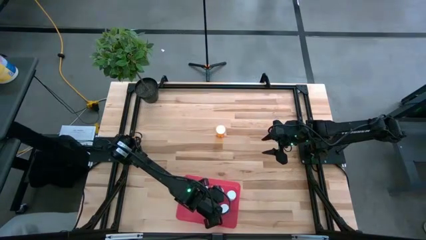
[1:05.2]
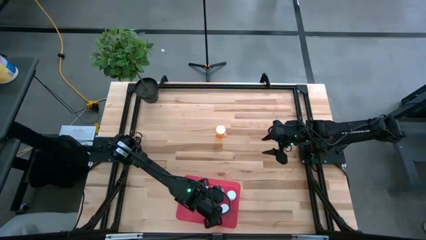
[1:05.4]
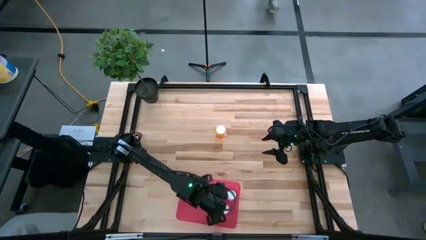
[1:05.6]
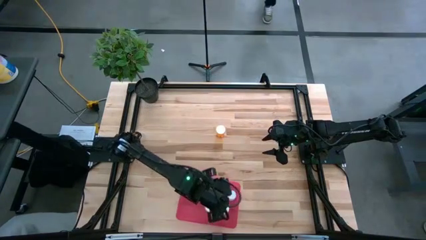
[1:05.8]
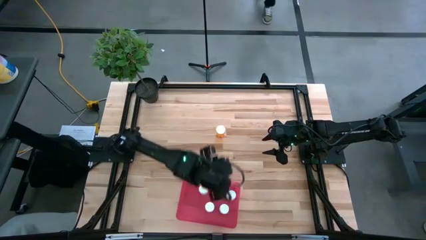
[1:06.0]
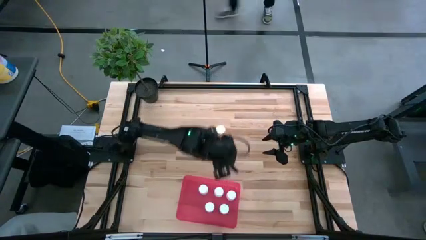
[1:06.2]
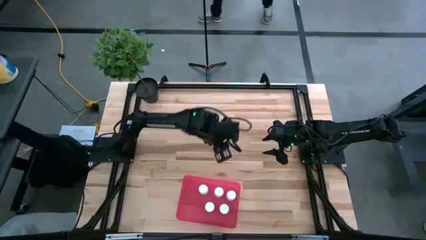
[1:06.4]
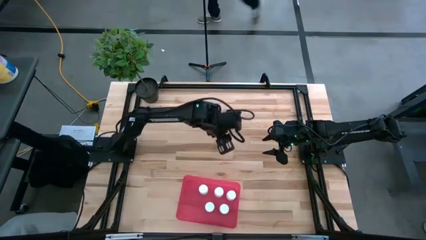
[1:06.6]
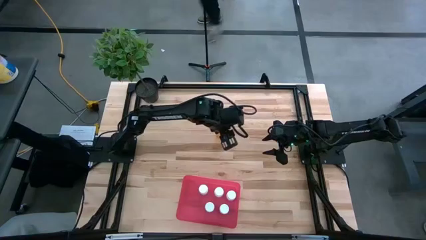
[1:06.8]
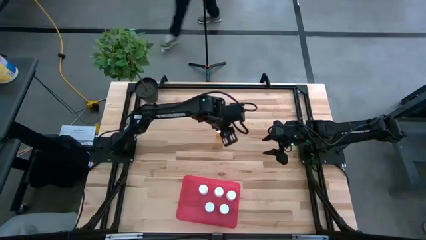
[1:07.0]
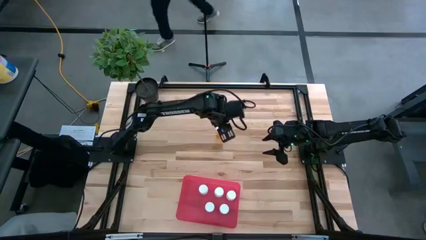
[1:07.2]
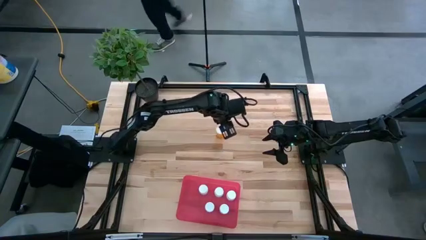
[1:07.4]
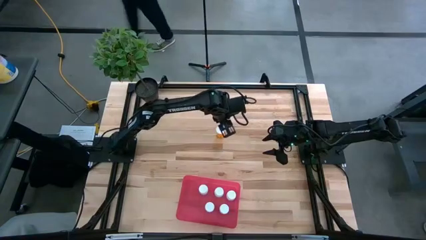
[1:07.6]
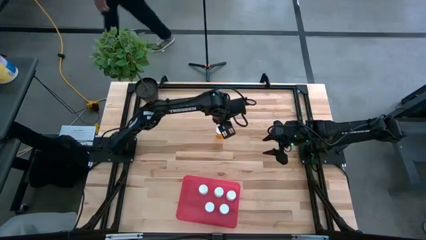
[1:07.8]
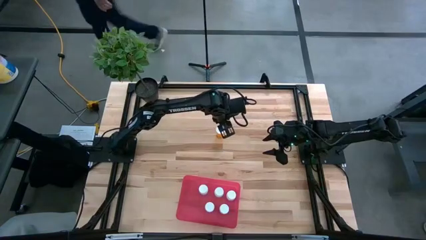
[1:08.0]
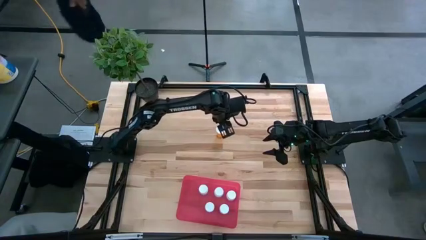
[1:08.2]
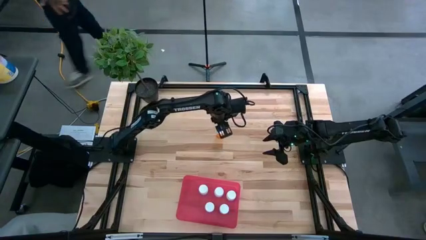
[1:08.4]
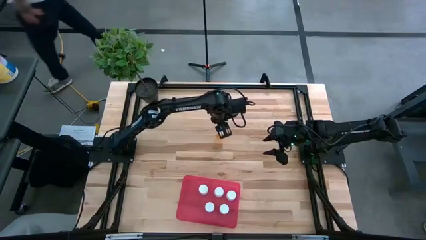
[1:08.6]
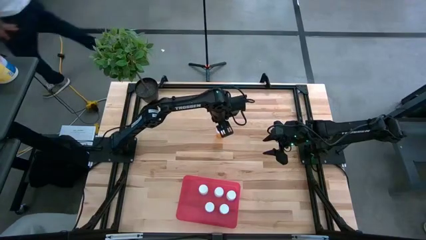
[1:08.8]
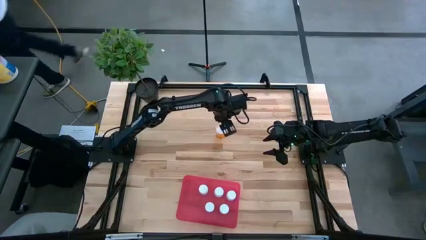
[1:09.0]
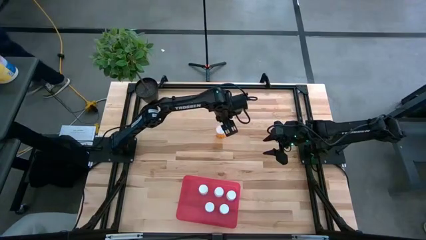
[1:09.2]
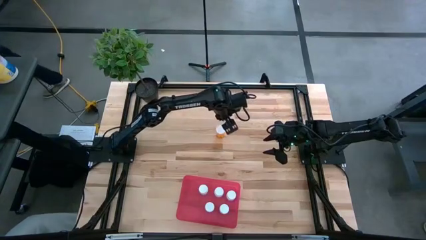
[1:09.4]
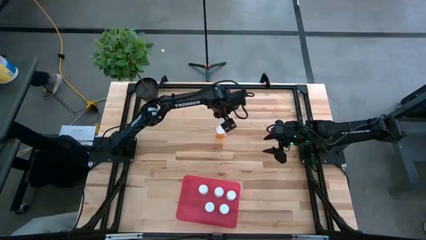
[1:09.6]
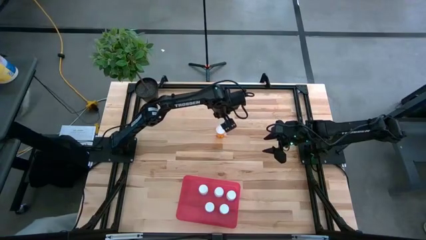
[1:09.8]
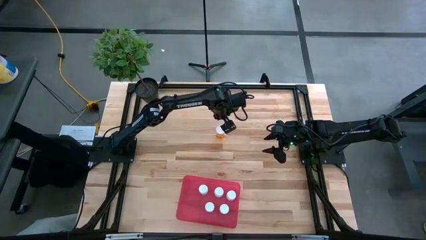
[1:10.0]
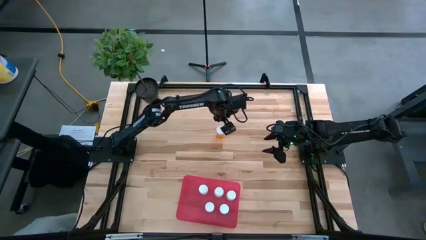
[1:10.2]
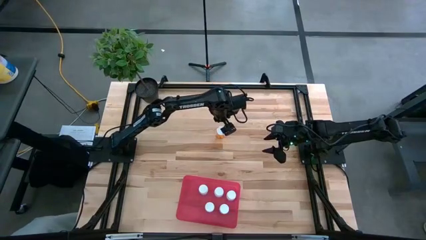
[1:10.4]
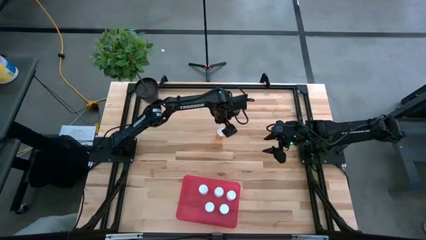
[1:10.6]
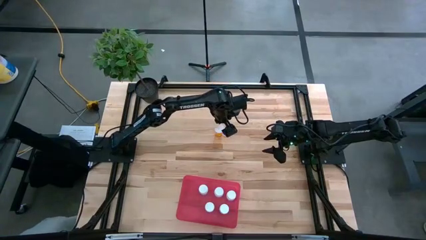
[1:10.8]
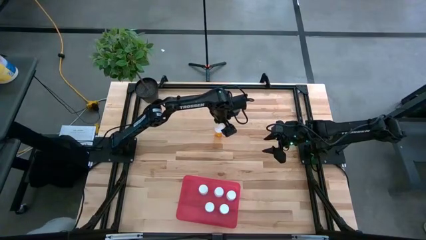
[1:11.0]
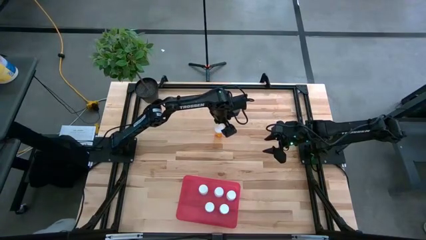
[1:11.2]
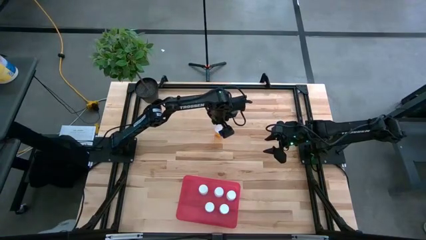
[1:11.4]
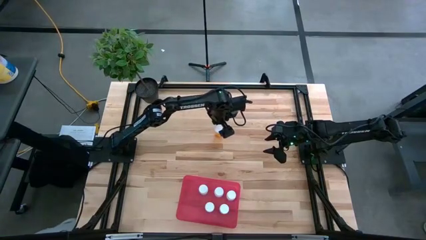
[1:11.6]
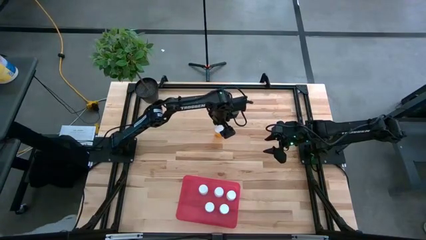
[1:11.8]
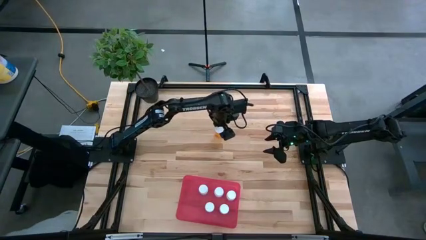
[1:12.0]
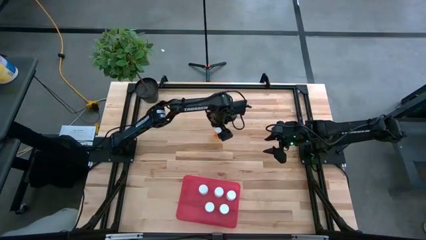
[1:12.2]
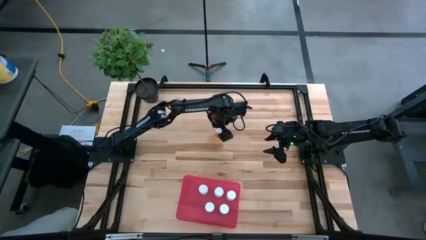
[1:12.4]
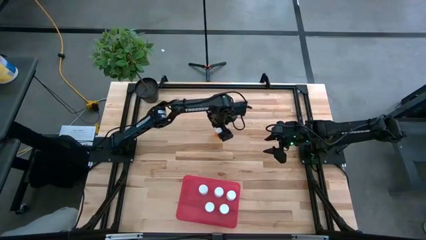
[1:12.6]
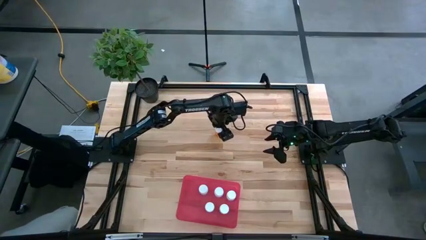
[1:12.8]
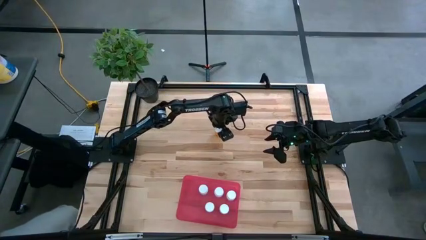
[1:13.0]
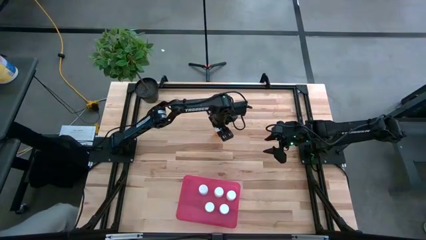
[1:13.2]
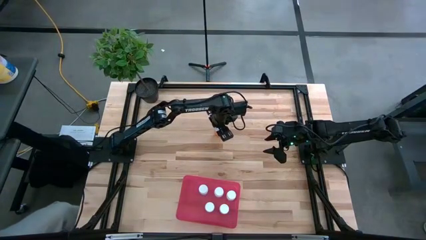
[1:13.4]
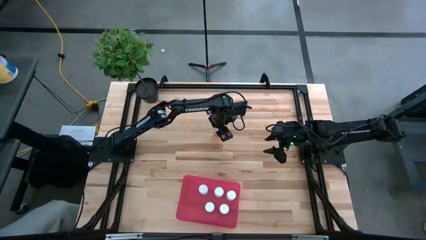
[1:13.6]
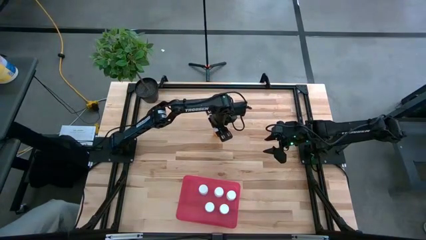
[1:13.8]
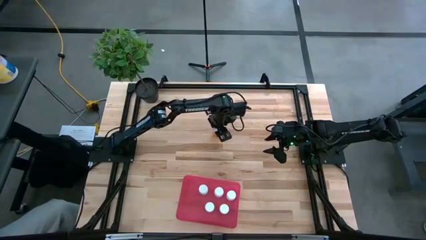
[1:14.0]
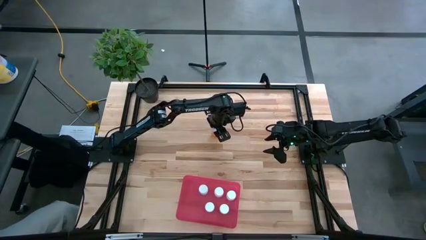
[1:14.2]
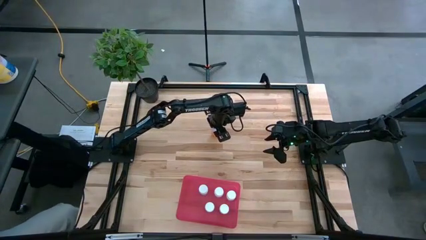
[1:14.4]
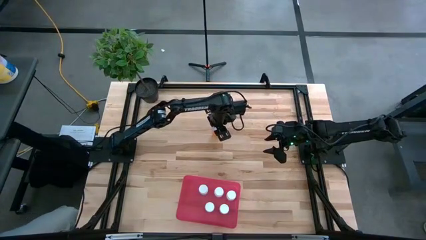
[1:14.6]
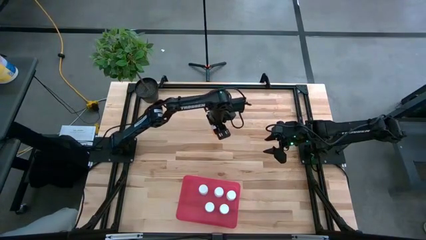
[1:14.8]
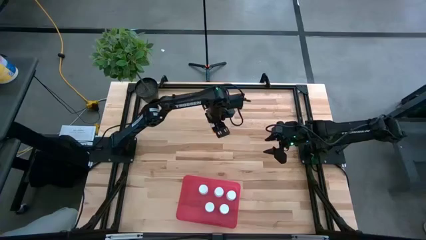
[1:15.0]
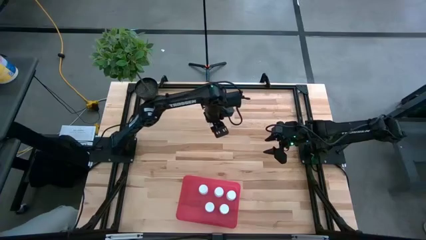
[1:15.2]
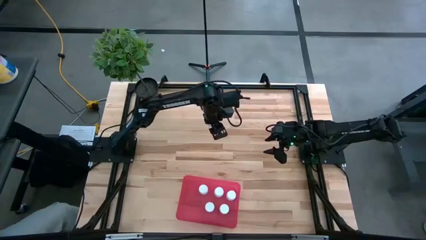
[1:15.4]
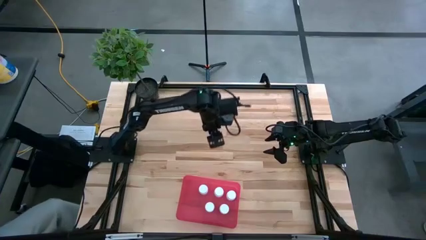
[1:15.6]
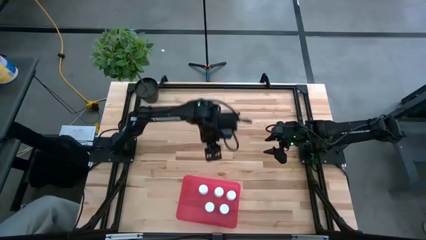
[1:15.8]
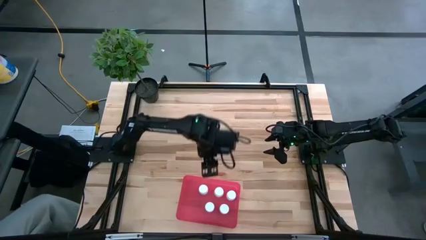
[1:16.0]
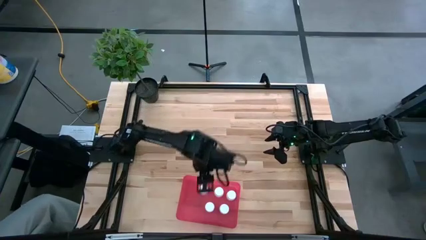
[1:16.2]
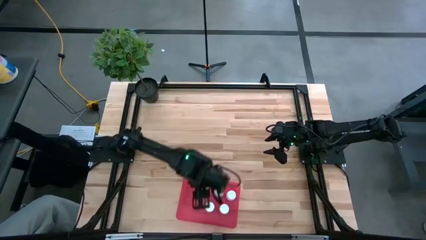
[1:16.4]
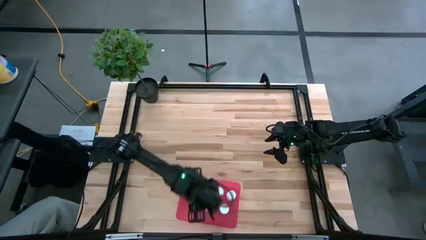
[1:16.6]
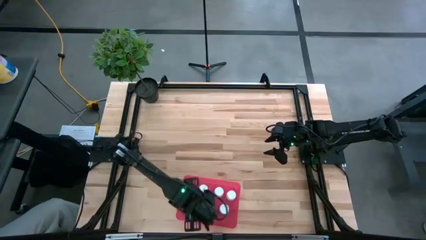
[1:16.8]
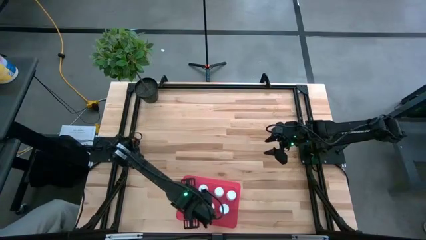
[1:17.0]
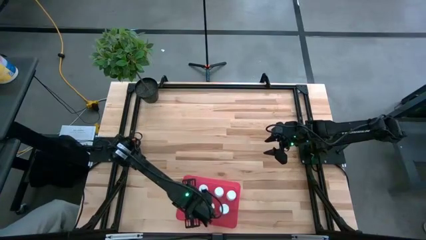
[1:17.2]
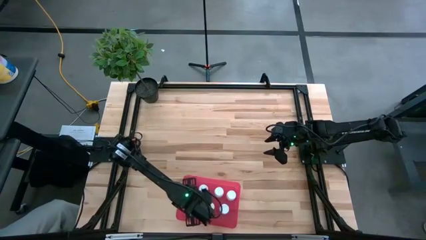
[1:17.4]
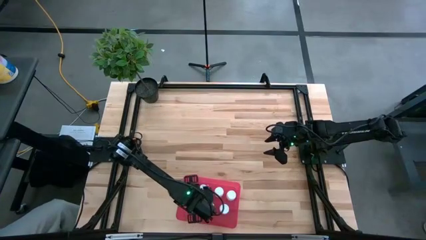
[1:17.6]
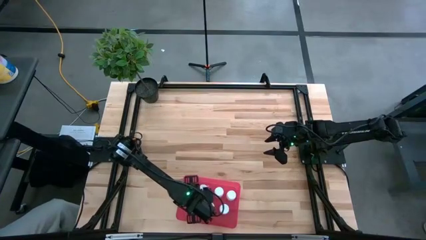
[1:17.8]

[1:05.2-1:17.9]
Task: Pick and place pill bottles into a basket
Put the orange pill bottle into the red bin

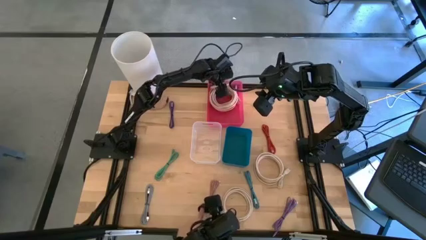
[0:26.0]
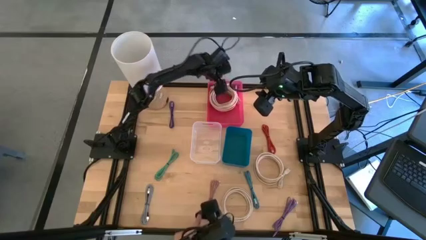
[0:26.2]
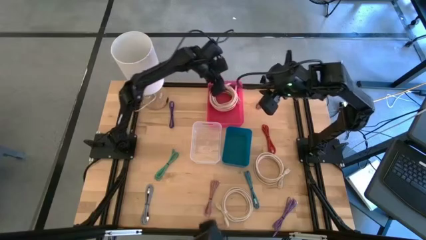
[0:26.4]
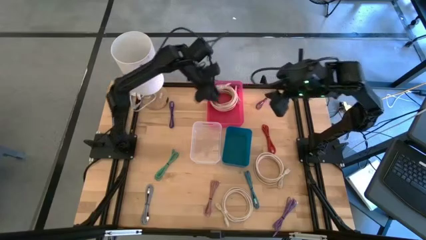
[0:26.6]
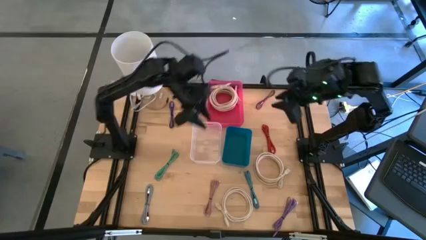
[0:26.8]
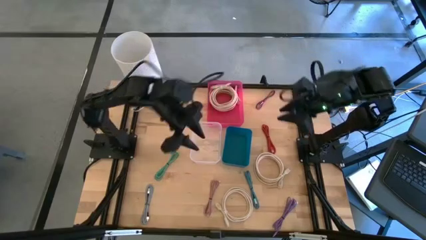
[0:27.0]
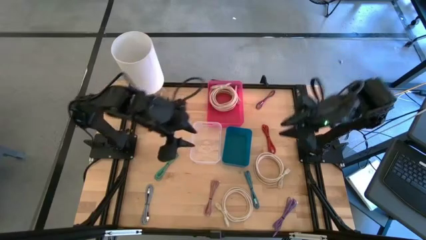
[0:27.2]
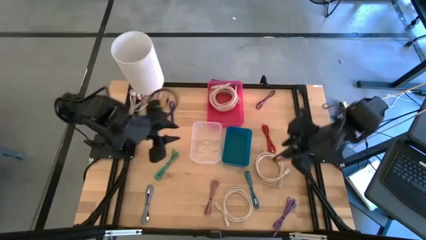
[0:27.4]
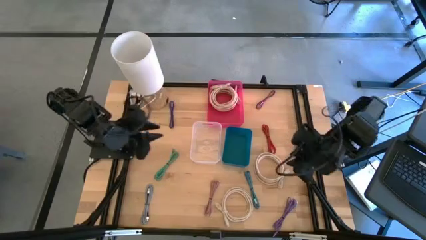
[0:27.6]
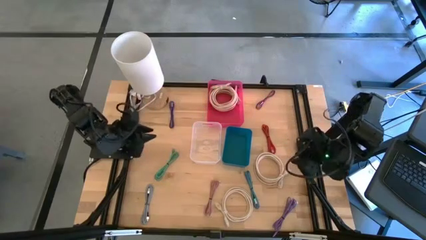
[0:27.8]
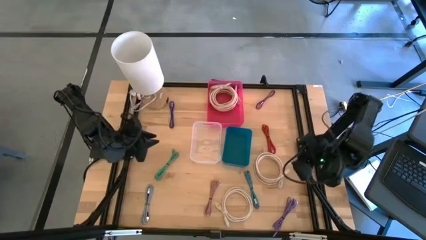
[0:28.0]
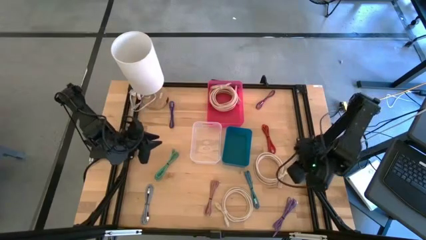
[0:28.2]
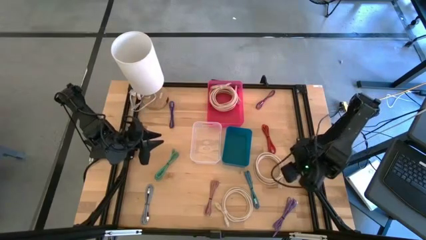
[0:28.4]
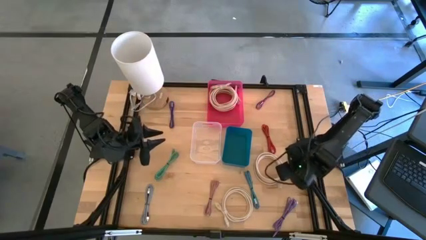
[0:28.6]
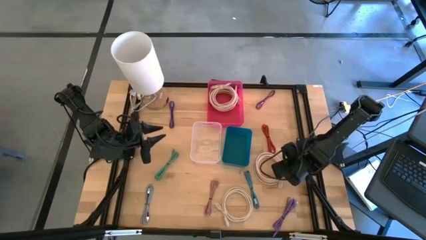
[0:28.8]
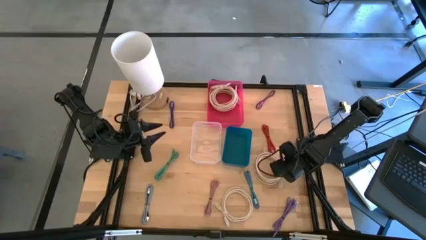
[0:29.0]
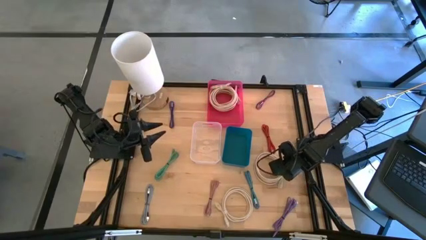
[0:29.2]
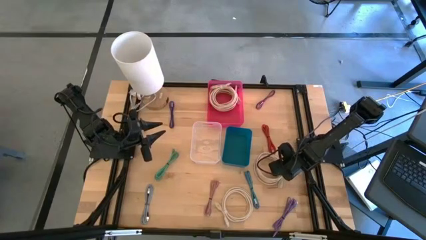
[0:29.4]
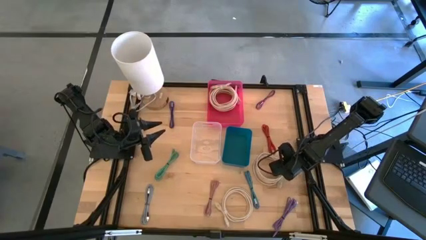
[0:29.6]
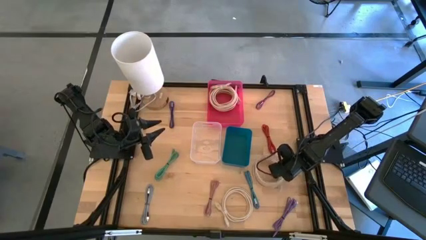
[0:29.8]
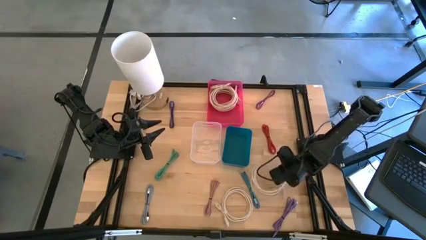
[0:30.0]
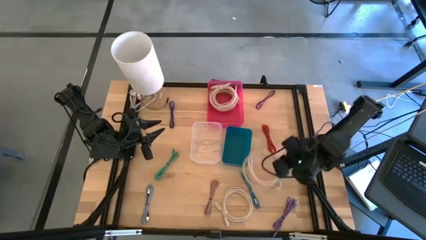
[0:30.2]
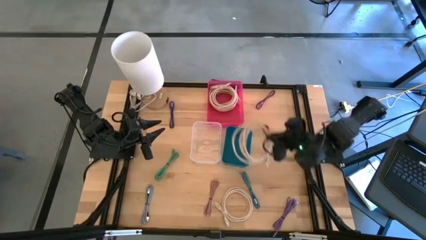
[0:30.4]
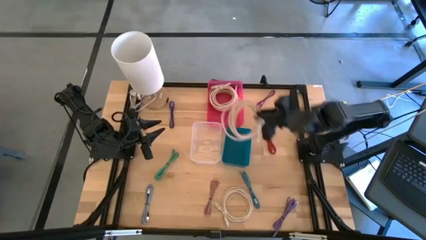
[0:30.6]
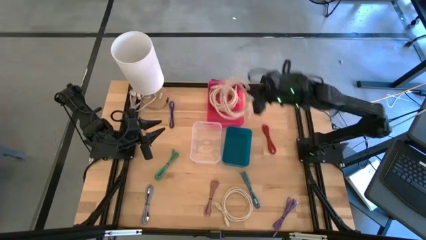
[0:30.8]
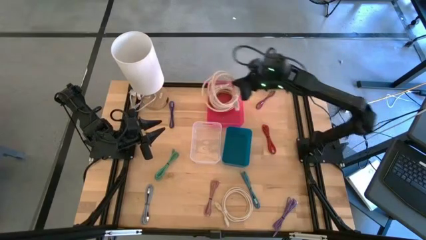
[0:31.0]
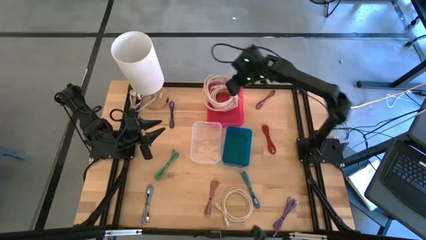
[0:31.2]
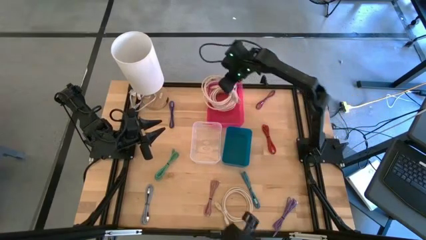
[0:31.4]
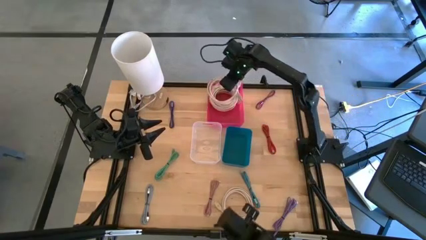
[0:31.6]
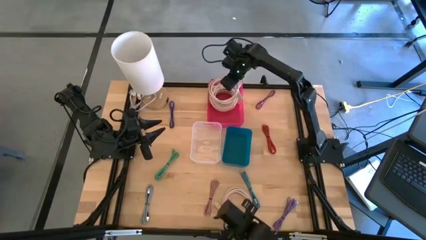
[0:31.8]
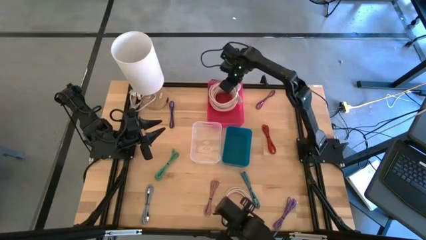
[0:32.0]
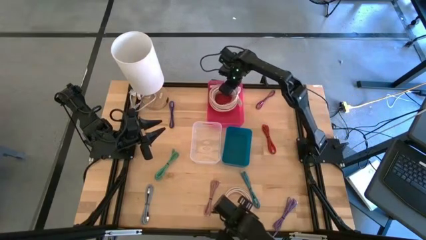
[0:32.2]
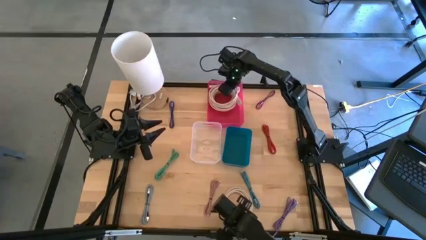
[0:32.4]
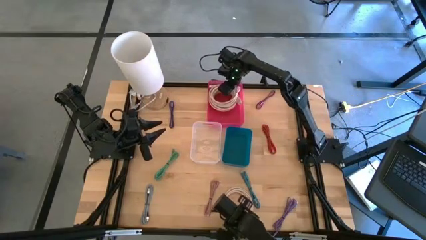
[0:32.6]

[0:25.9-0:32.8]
Task: Pick & Place USB Port
Put the light brown HDMI cable into the pink bin
